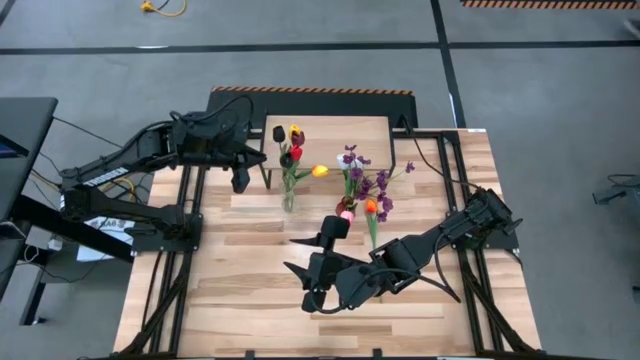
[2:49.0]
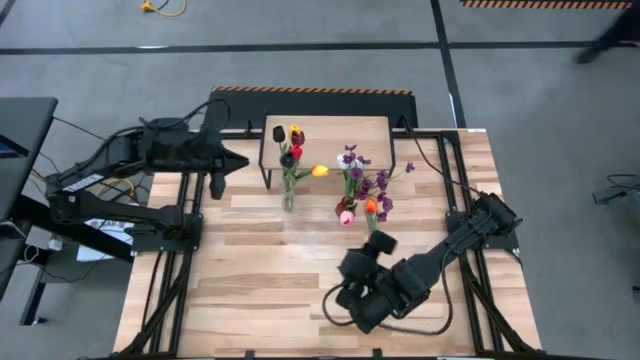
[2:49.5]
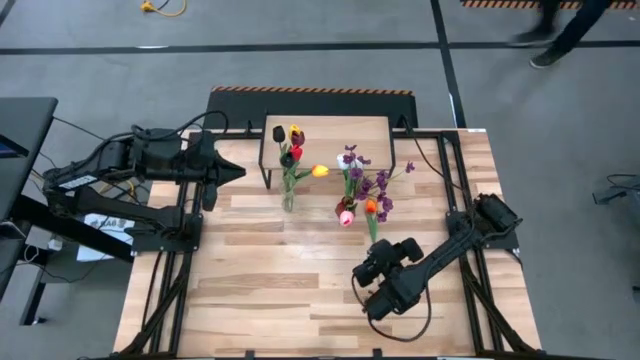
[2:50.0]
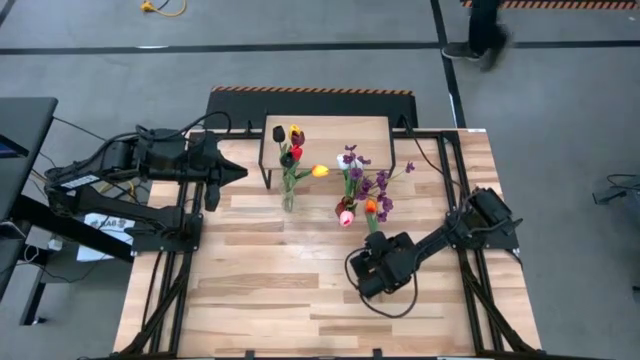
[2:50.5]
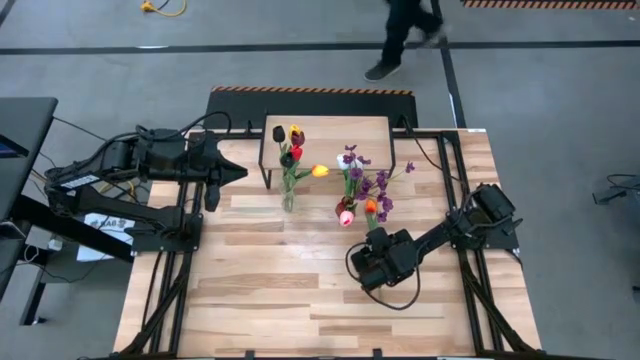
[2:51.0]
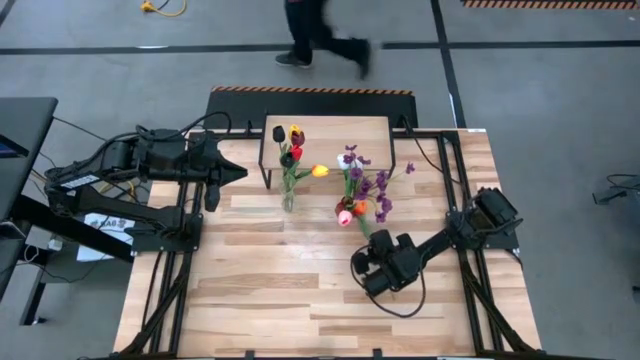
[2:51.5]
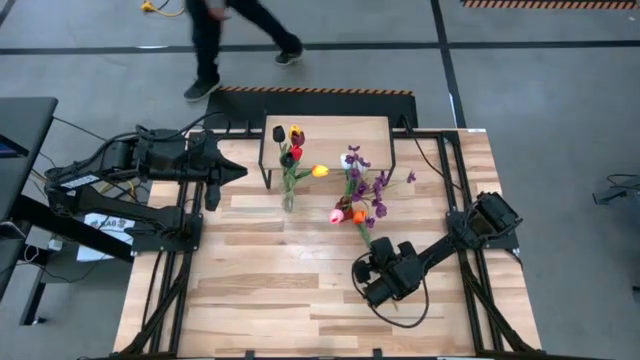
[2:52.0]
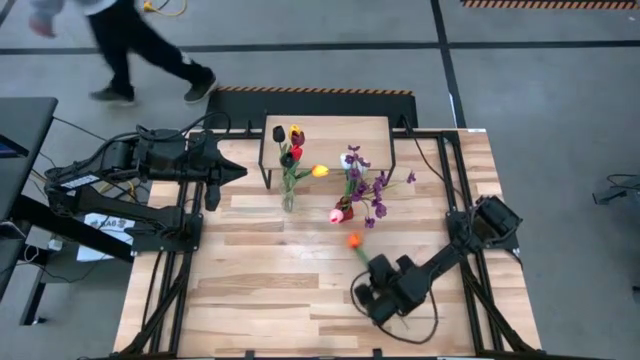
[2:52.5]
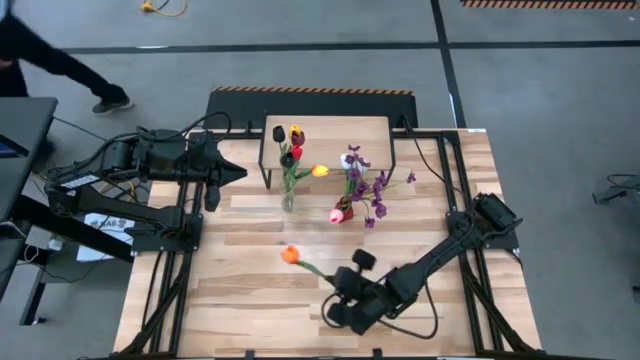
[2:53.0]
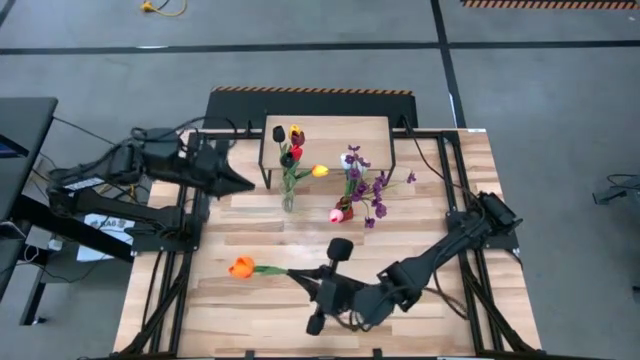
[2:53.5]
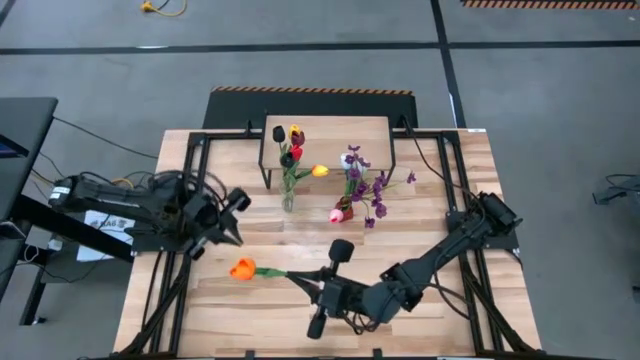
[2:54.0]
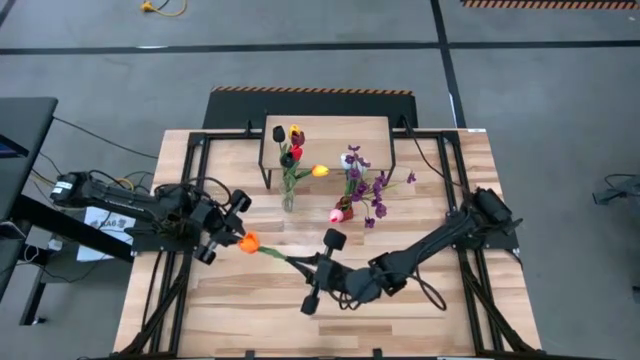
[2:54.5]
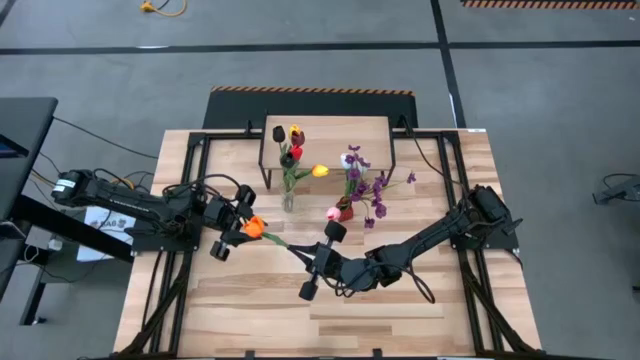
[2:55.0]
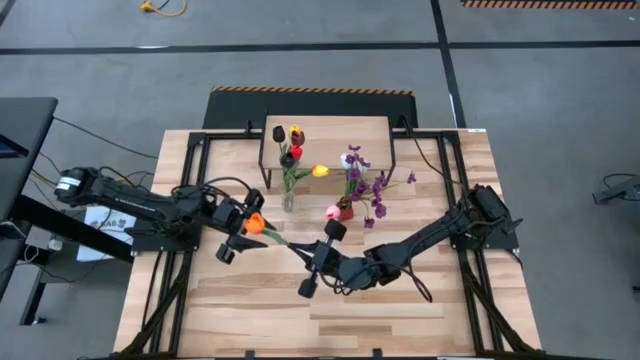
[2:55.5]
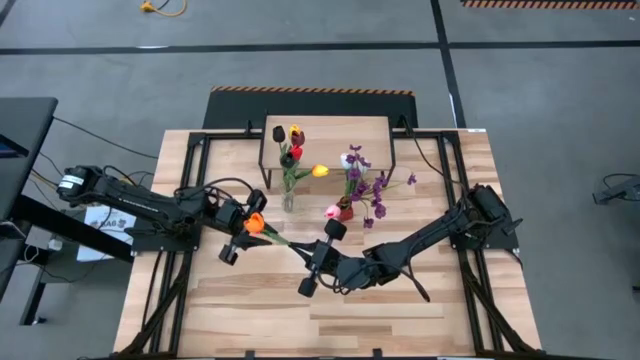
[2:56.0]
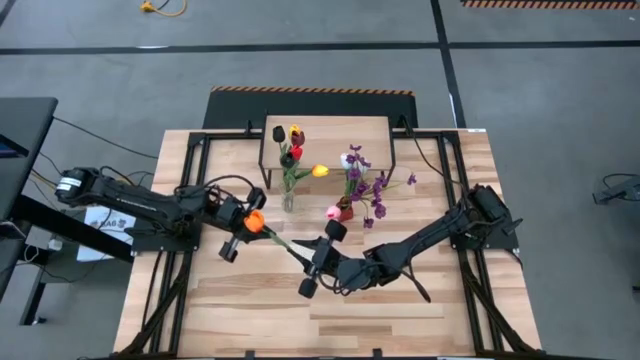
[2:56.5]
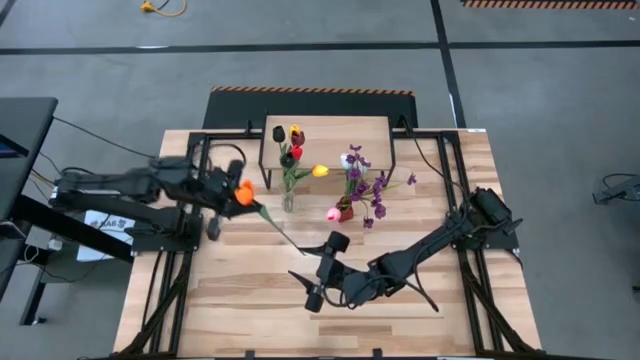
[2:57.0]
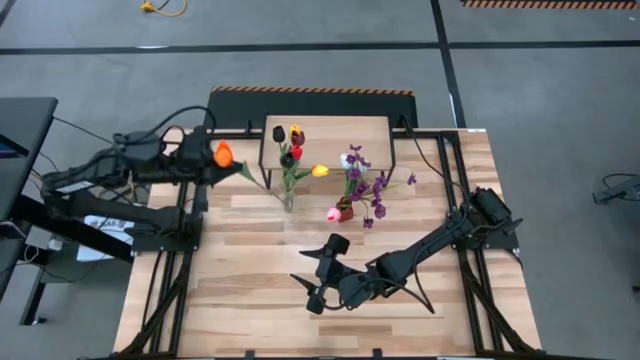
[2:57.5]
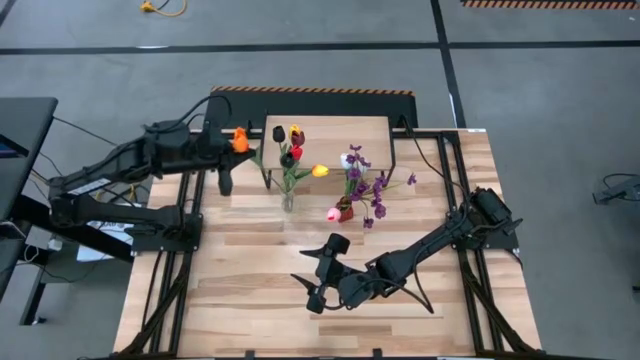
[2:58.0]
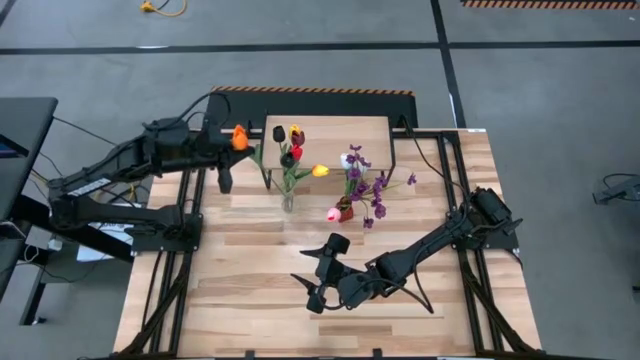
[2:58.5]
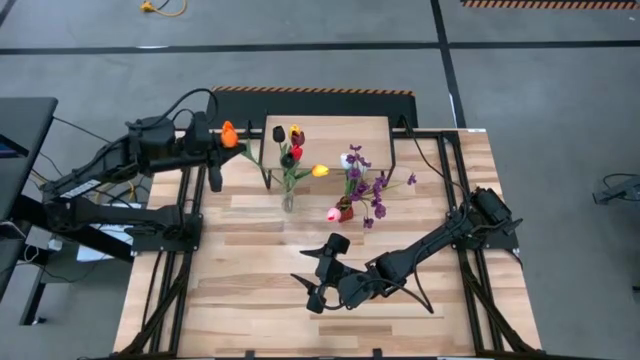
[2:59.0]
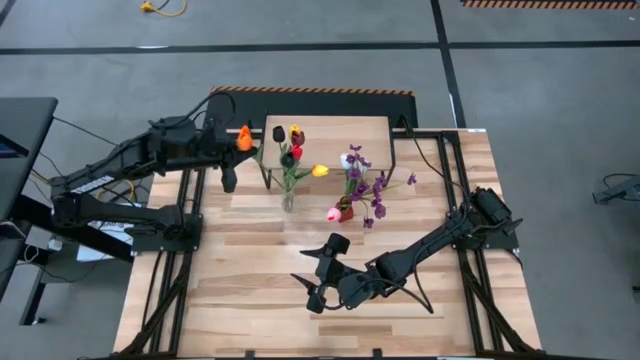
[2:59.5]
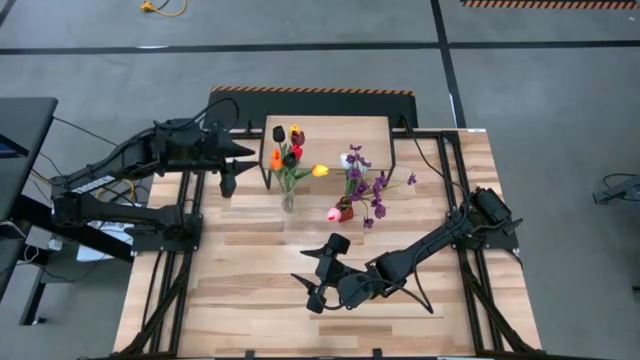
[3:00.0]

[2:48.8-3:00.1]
Task: Pick and place flowers into a vace then onto a shelf
Put the orange flower into the transparent vase

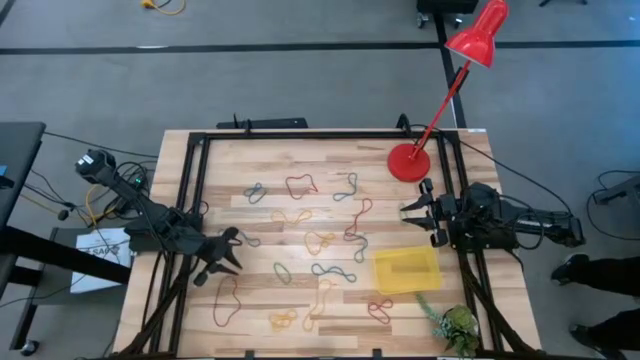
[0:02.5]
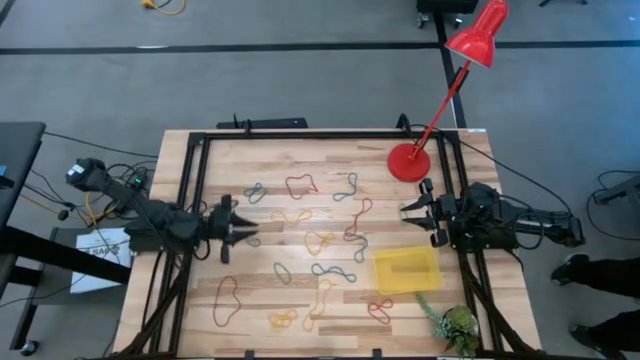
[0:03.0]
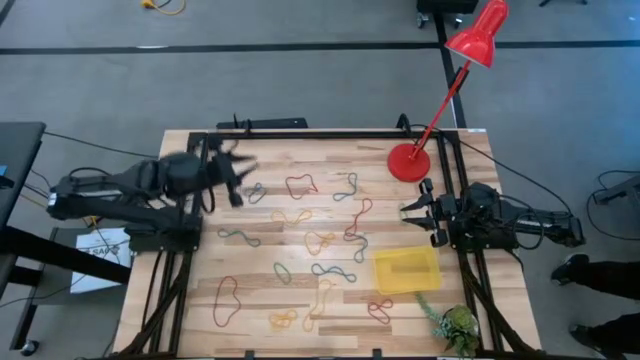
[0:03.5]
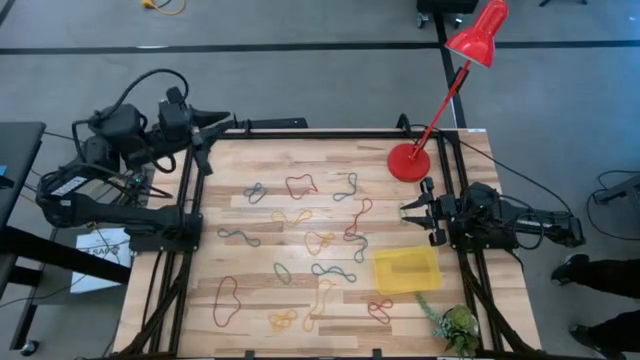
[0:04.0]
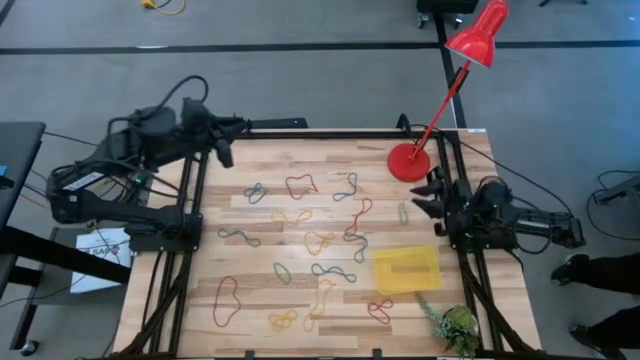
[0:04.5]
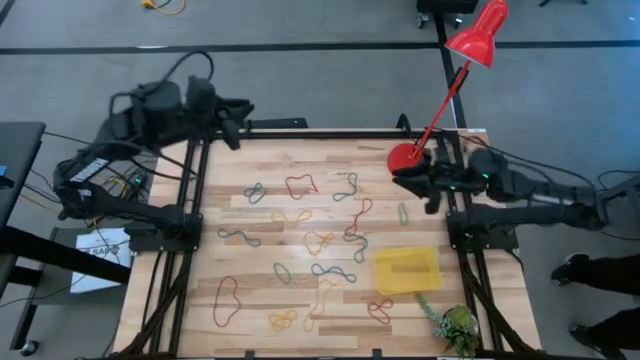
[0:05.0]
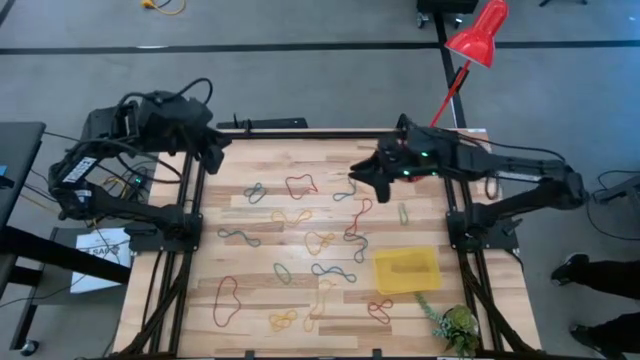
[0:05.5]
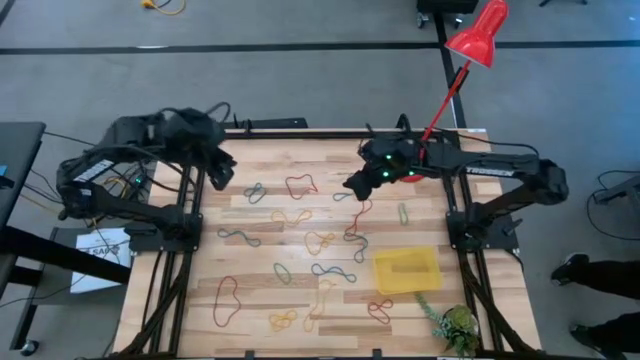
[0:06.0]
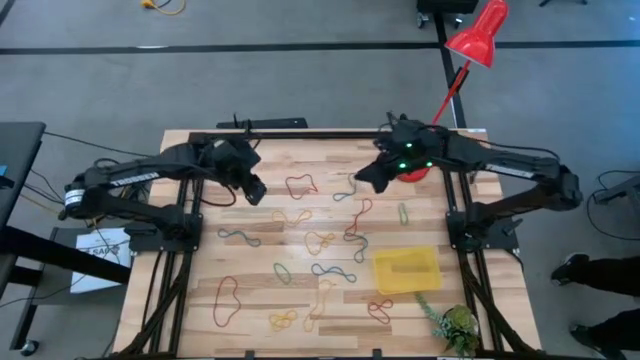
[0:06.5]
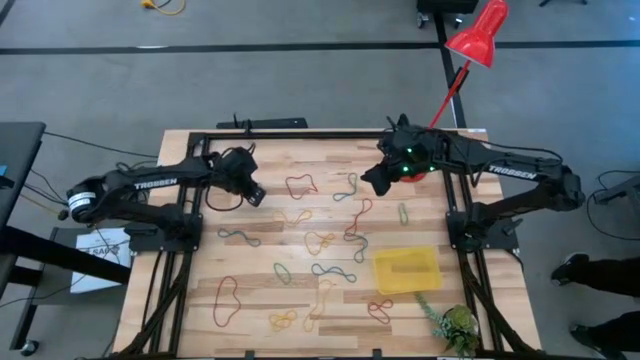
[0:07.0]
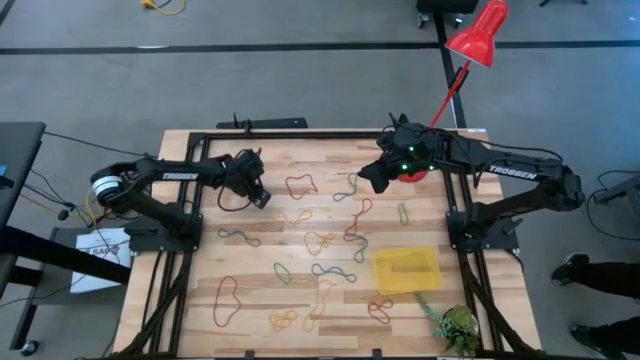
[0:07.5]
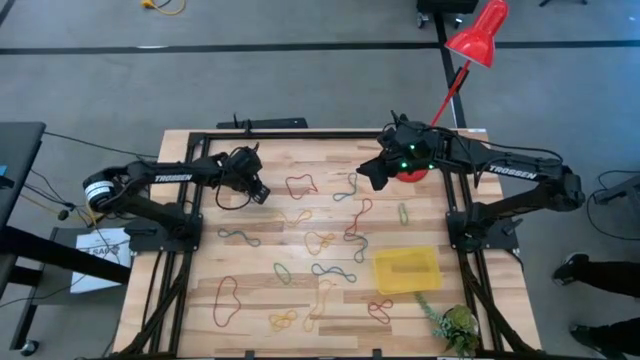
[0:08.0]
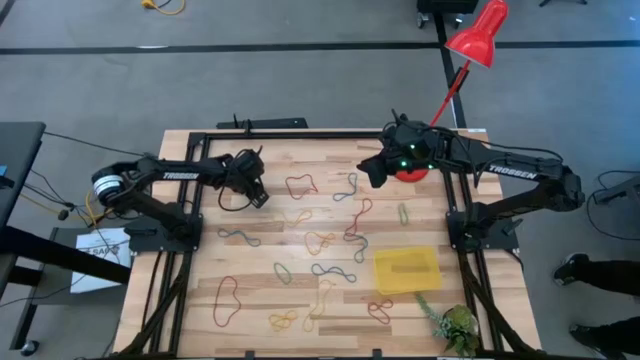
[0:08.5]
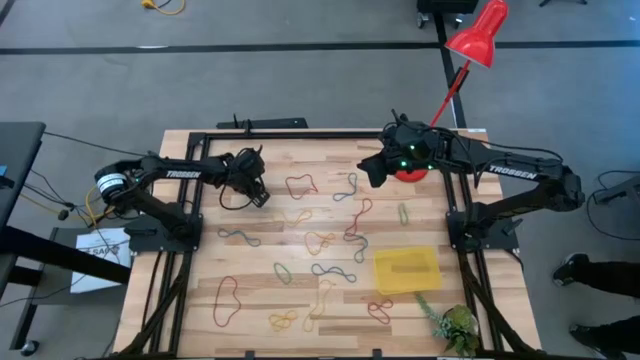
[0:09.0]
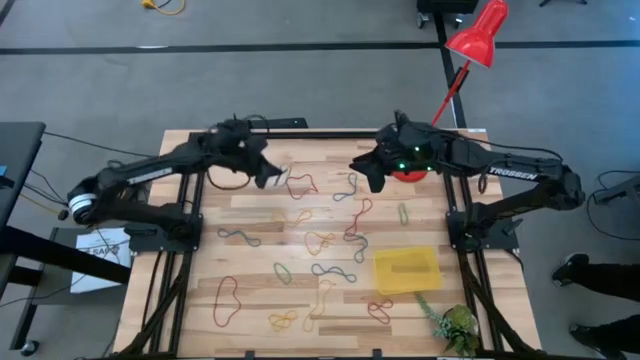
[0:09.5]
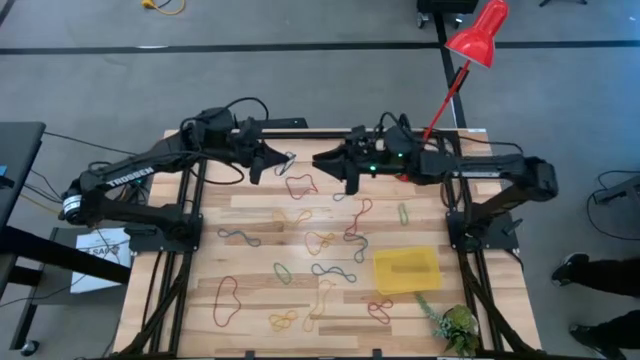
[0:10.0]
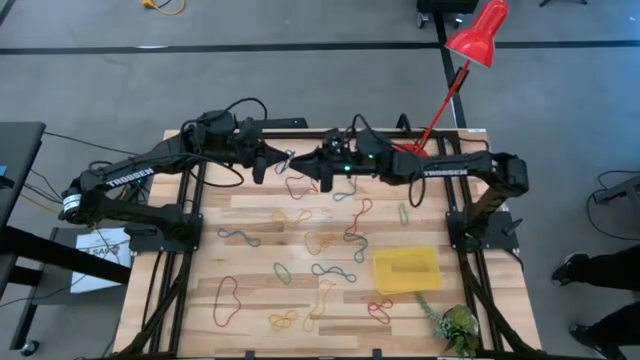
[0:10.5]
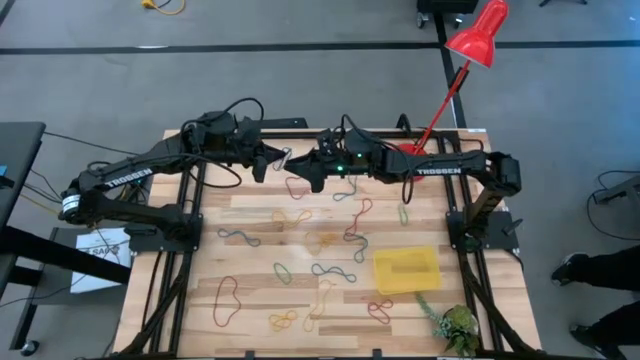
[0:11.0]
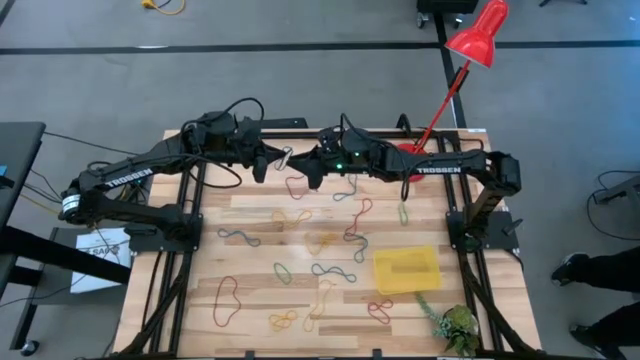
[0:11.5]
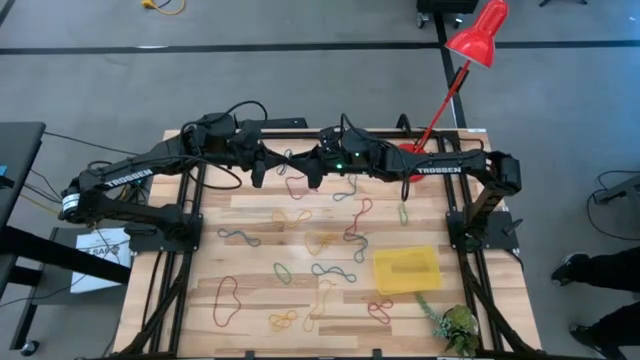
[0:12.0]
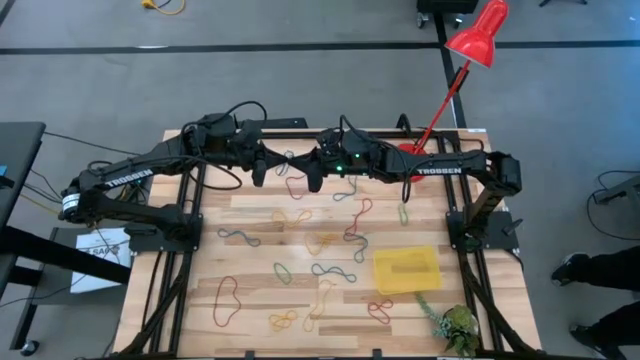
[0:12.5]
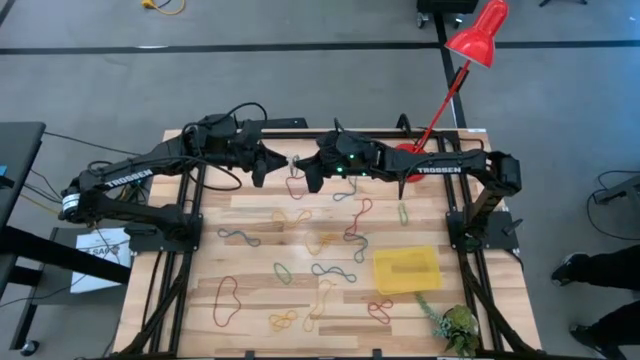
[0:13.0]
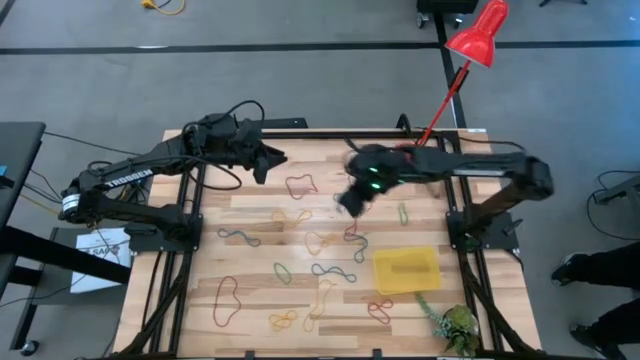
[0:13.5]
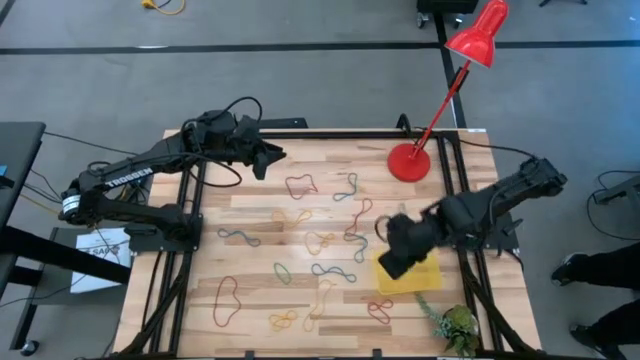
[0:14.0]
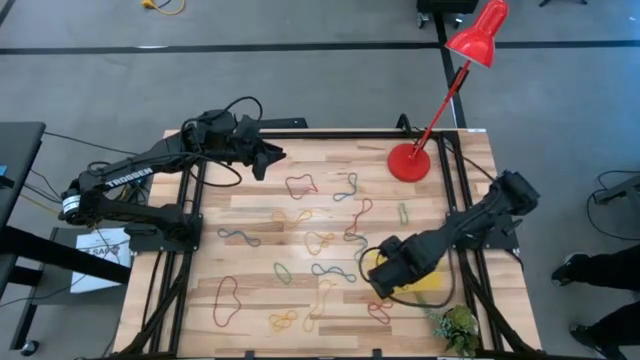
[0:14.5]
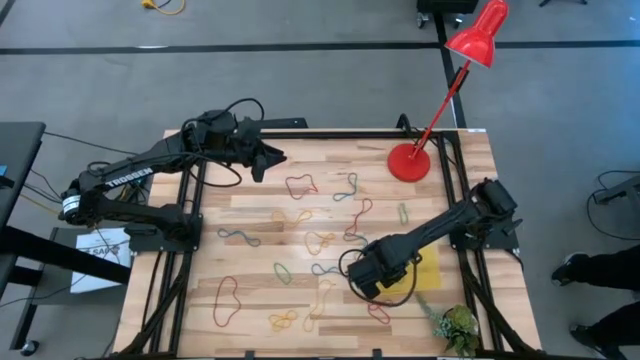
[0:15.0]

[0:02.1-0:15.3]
Task: Pick and place items into bin
Put the blue rubber band into the yellow bin
